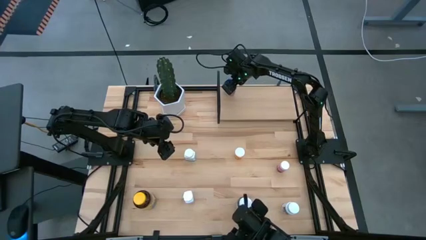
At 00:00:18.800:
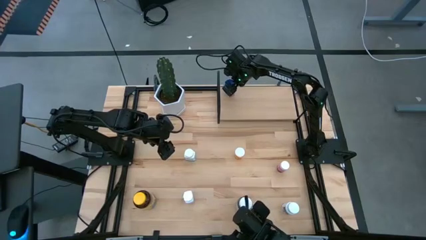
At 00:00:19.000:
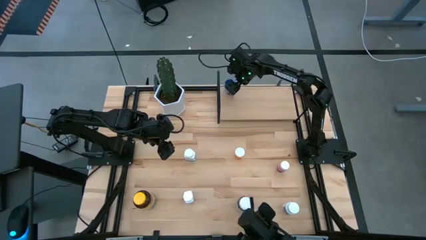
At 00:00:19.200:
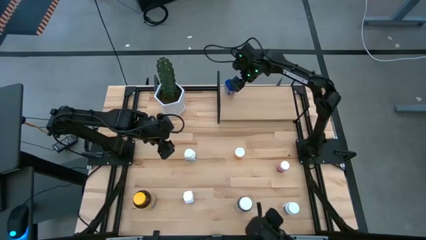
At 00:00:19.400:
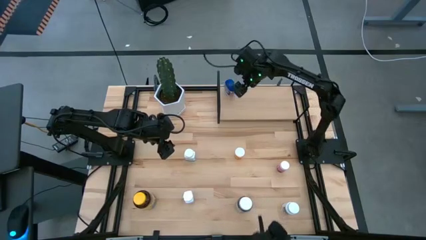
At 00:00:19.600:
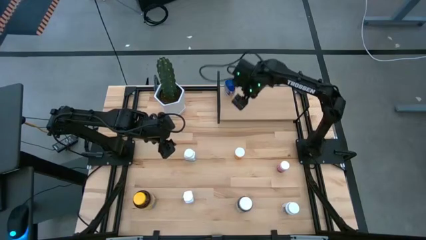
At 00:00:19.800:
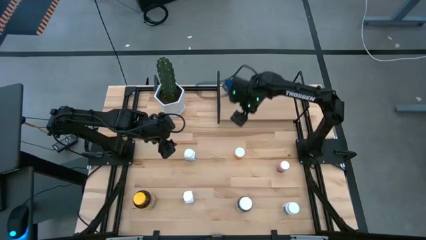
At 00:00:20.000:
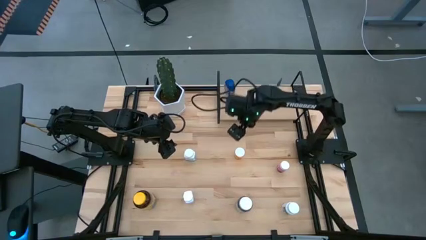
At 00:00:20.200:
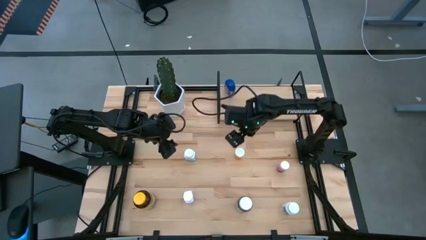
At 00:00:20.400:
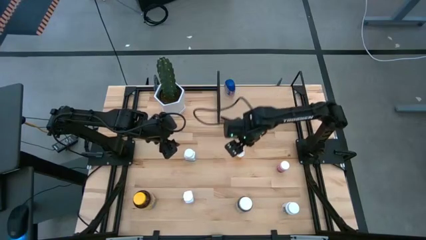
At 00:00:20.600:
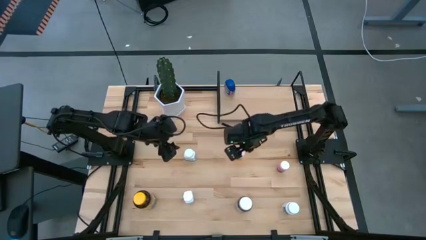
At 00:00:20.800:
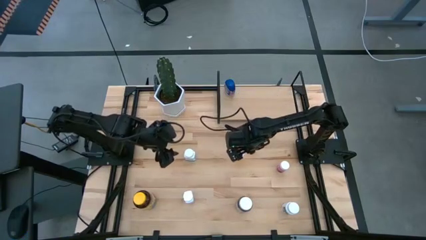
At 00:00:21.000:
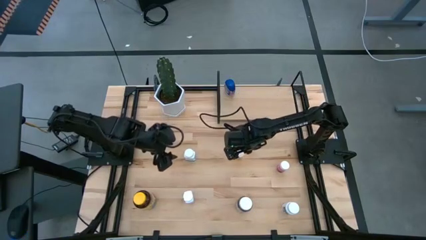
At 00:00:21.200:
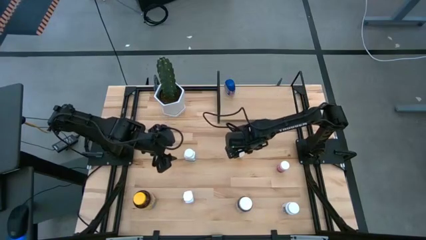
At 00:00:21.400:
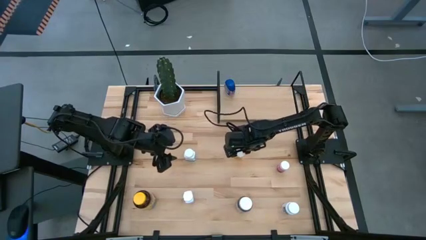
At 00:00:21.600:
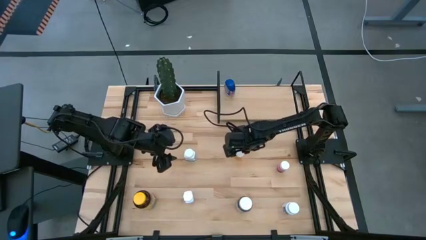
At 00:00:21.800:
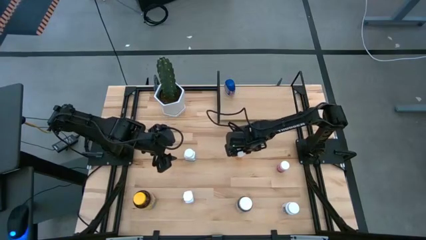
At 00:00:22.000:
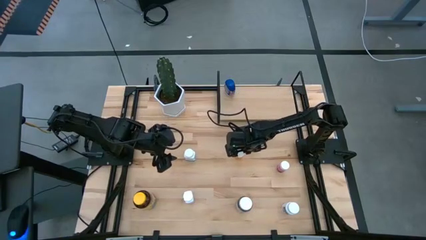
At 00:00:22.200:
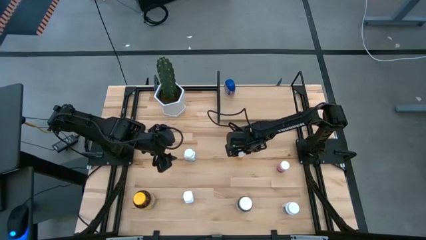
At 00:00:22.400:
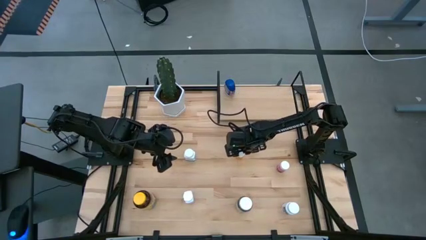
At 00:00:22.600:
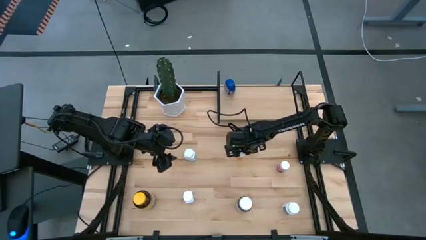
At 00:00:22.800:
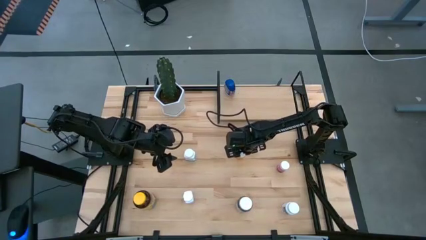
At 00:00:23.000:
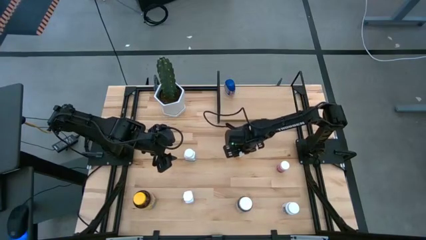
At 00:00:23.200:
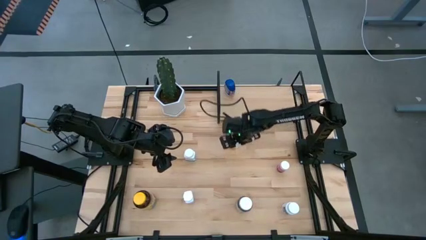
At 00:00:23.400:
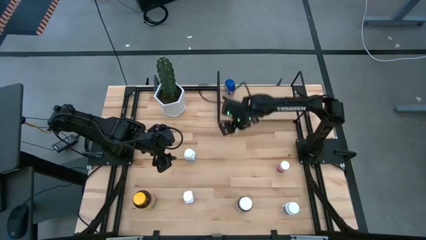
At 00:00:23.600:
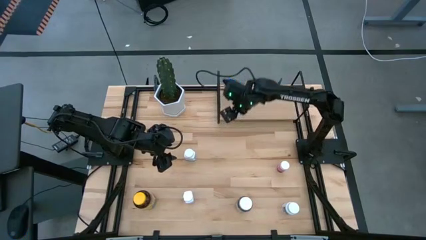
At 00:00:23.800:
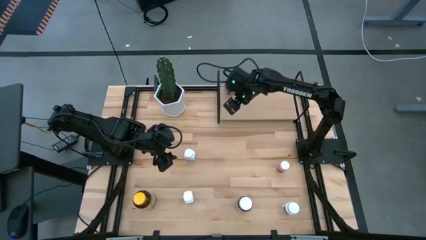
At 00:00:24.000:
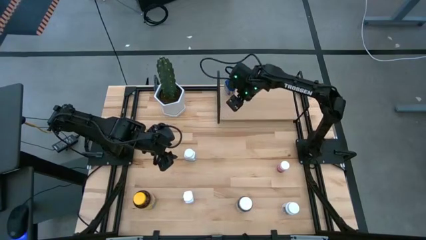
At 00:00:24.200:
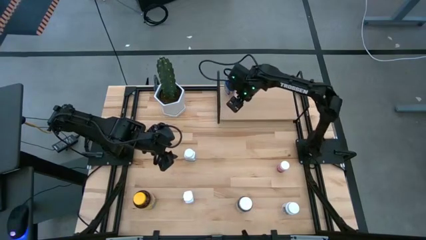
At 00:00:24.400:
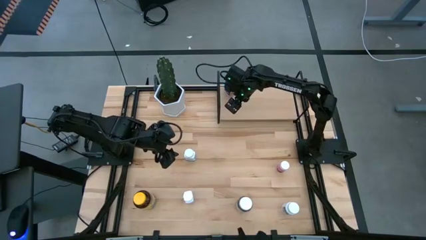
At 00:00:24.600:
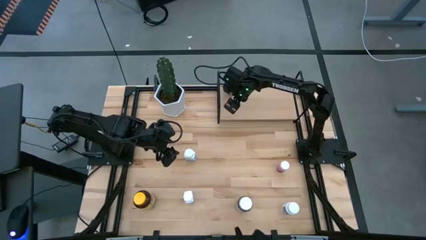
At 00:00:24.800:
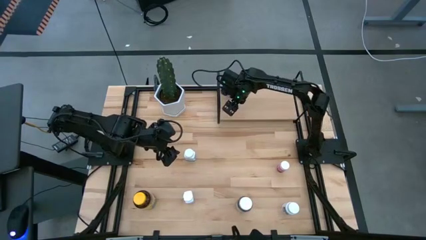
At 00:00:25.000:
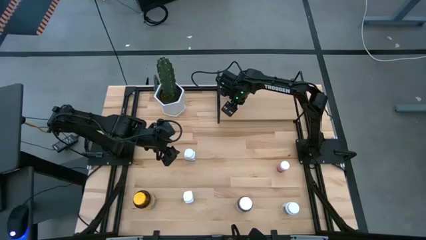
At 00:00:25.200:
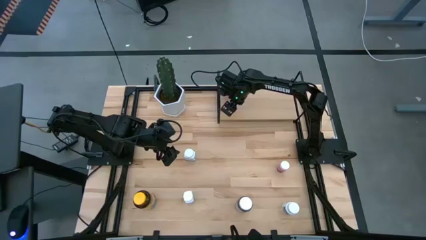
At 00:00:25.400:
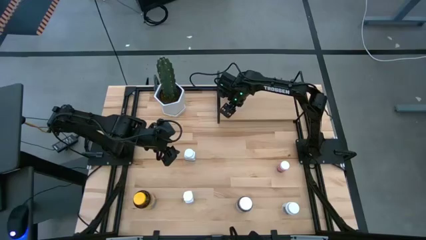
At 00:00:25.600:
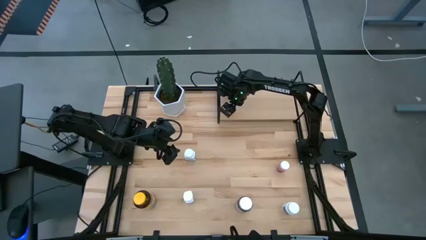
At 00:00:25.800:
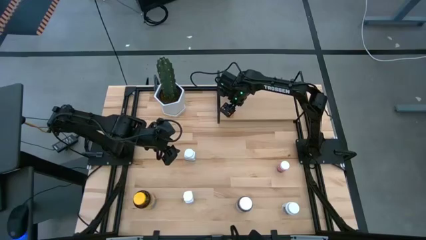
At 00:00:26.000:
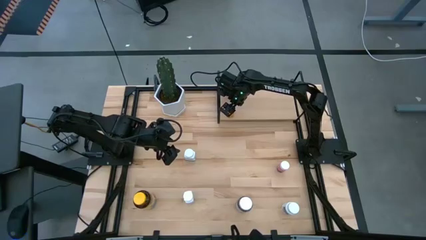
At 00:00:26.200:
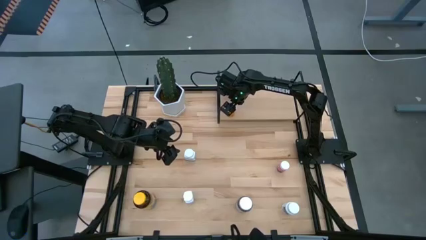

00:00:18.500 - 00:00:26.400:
Task: Pick and place medicine bottles onto shelf by color
Put the orange pill bottle on the shelf

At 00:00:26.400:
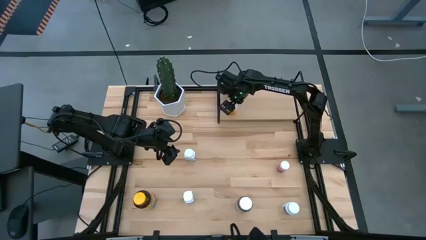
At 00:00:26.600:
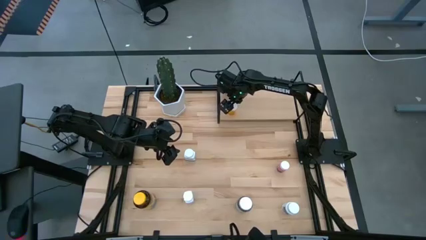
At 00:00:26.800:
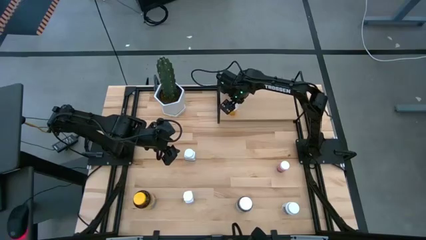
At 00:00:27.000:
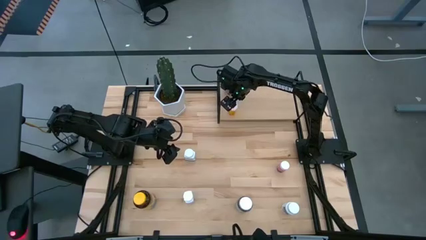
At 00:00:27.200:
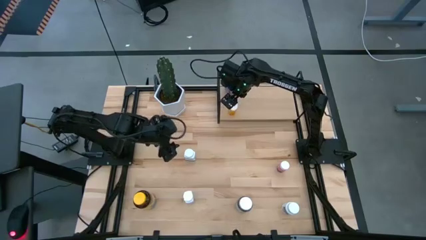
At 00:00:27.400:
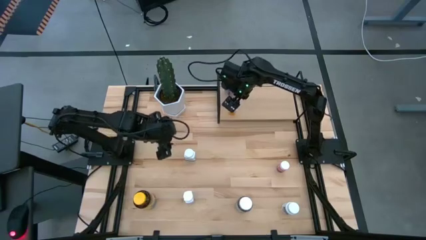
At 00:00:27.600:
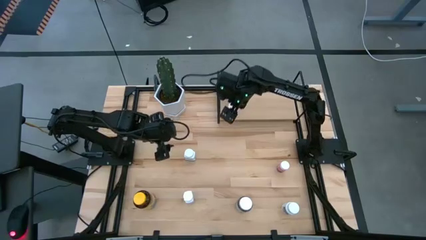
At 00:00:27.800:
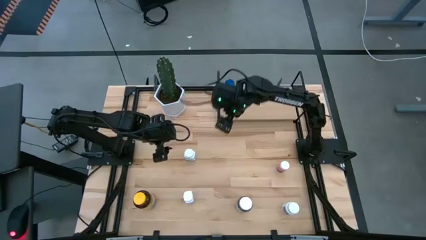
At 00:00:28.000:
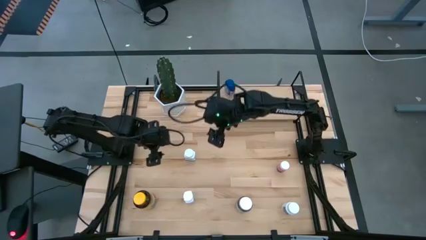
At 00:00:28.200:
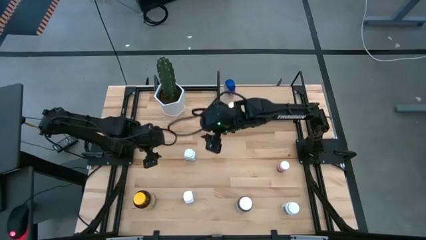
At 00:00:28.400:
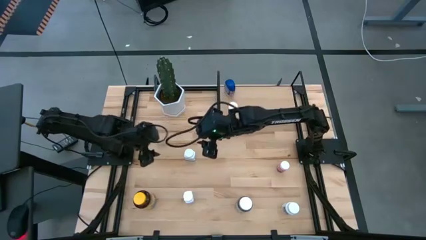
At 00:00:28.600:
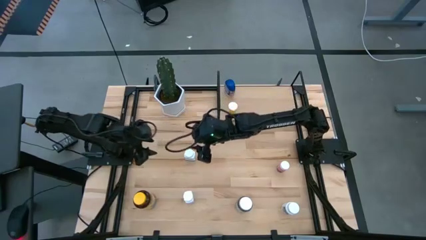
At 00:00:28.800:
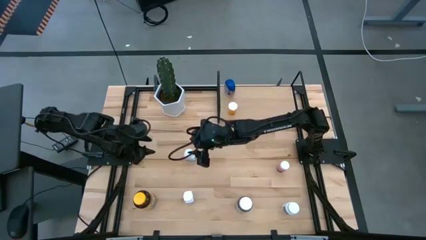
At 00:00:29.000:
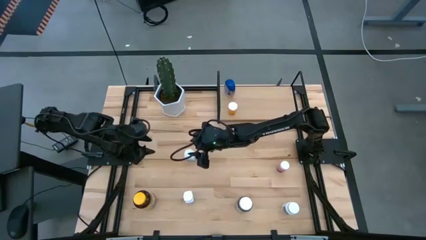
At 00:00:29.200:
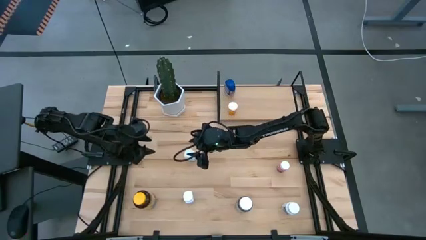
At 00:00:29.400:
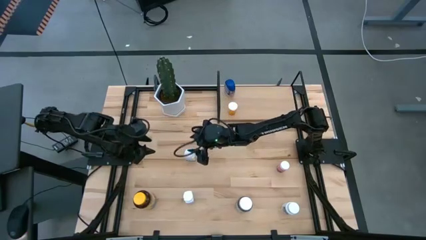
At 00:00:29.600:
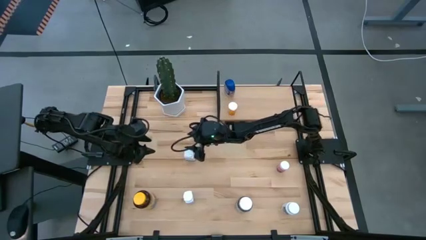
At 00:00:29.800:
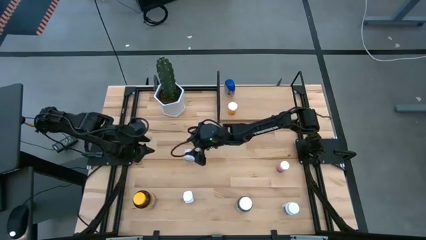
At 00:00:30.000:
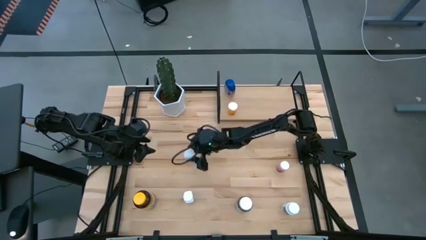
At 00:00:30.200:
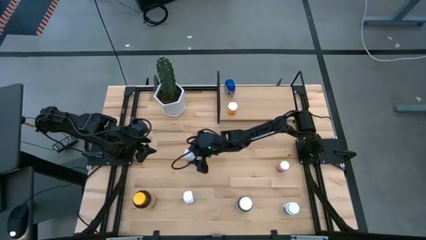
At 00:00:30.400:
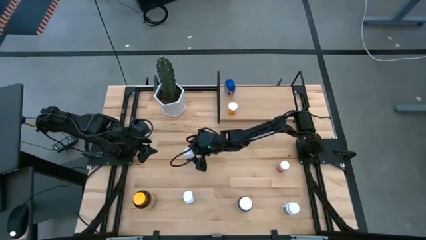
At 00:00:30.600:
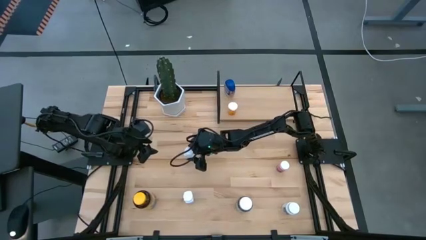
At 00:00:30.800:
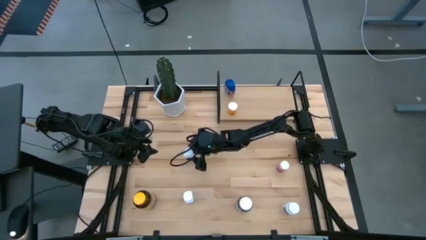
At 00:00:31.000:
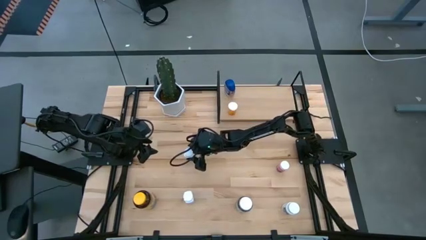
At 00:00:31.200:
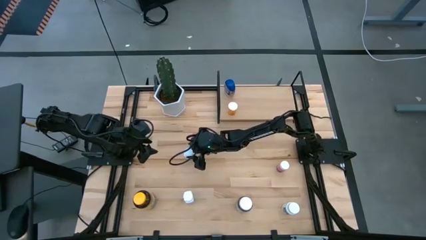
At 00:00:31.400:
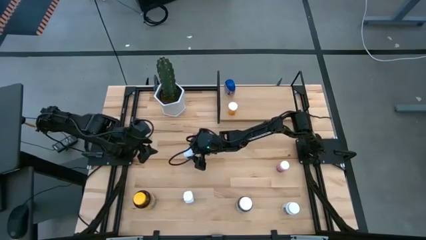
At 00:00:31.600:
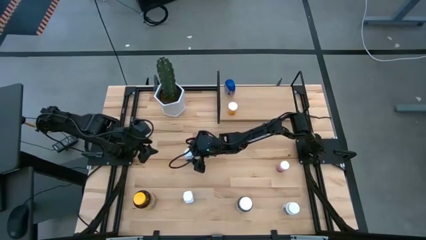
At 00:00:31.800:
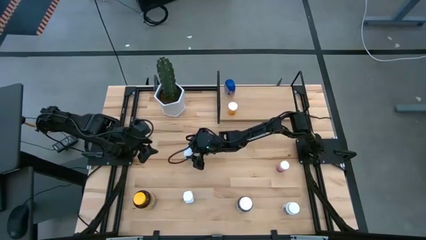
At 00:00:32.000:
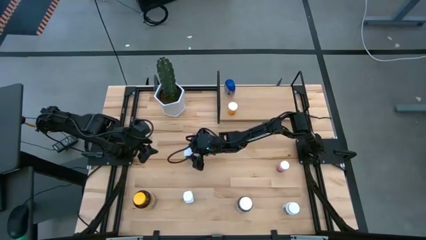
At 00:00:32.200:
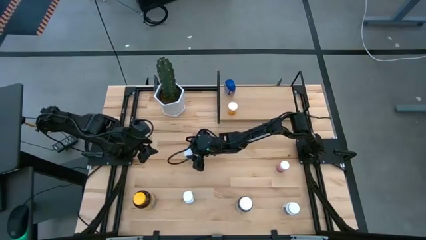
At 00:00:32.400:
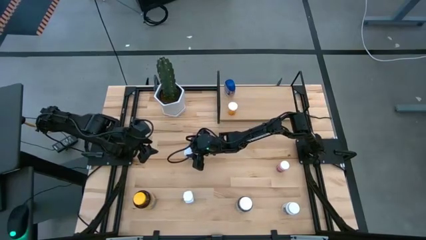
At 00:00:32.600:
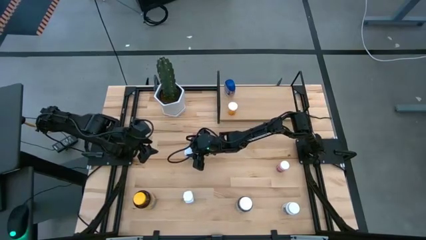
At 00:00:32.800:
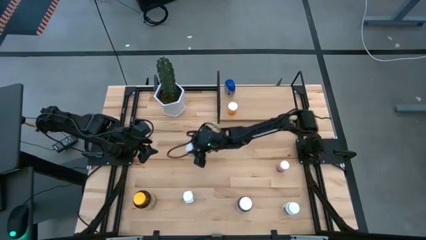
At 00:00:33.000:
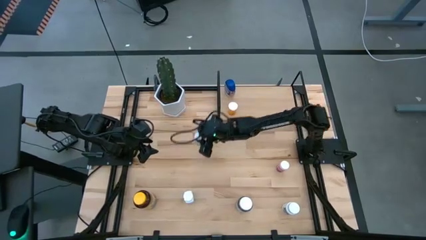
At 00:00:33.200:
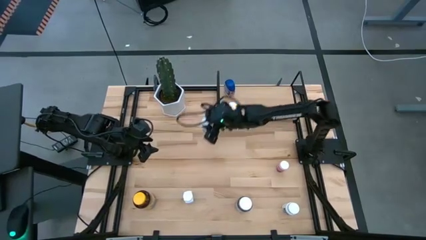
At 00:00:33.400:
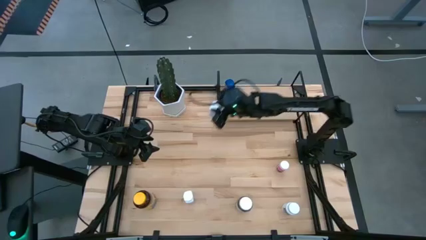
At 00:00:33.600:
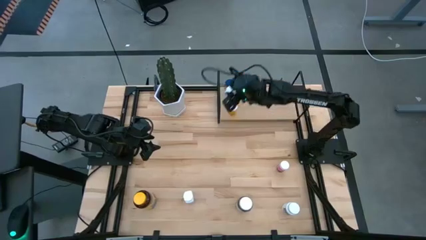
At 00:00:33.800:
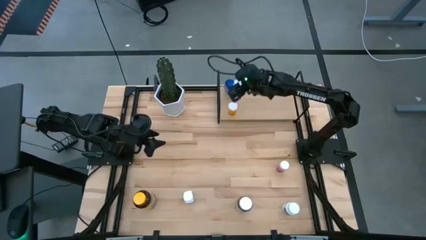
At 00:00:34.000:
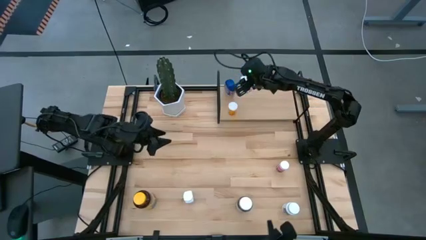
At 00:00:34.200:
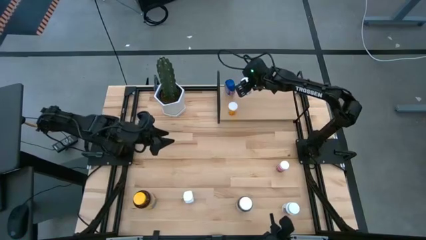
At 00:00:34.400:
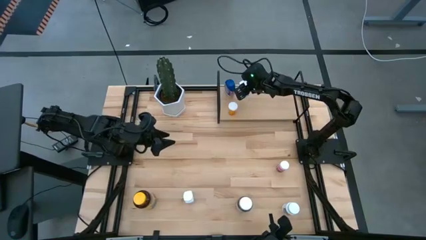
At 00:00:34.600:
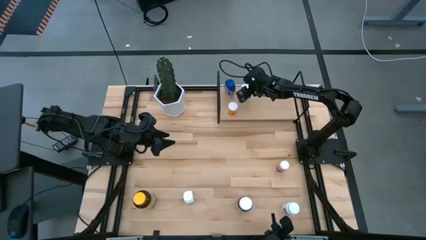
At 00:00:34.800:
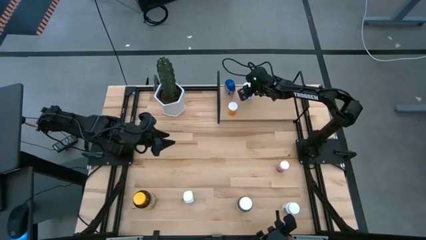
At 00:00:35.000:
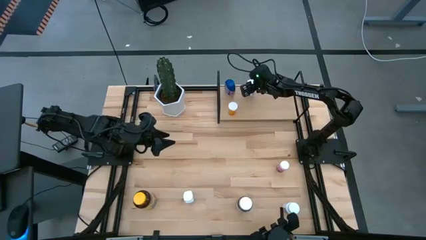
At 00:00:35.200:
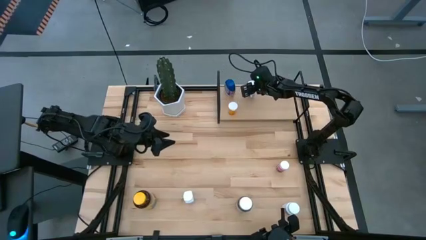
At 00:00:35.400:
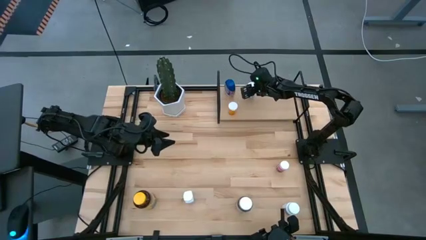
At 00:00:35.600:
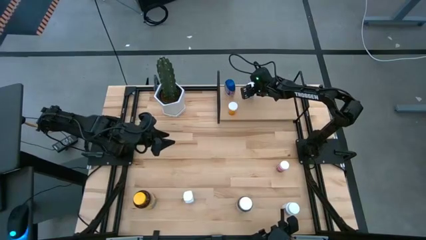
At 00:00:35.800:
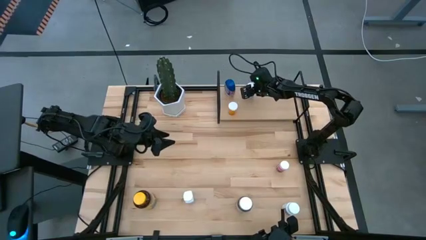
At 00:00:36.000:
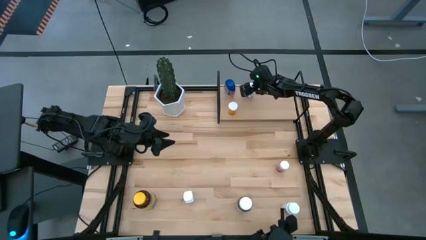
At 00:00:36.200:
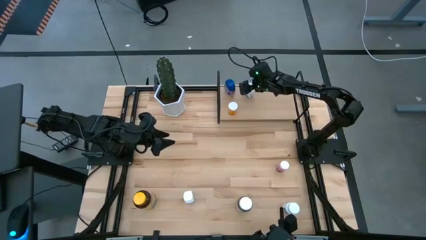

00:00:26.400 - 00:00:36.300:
Put the top white pill bottle on the shelf
